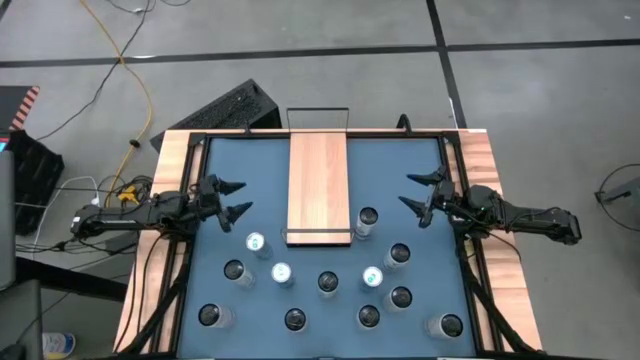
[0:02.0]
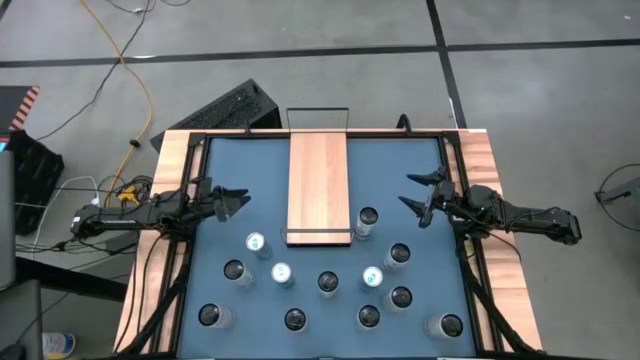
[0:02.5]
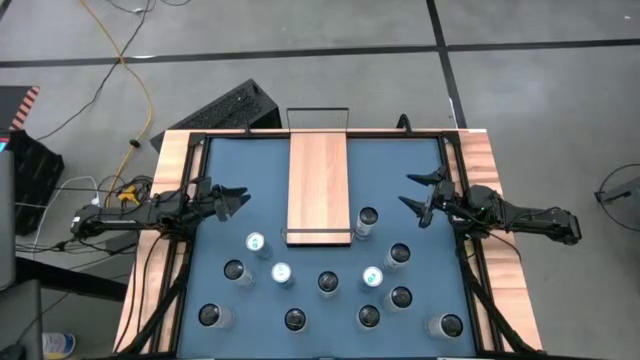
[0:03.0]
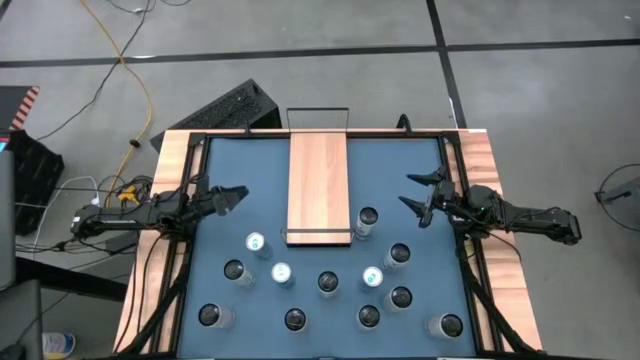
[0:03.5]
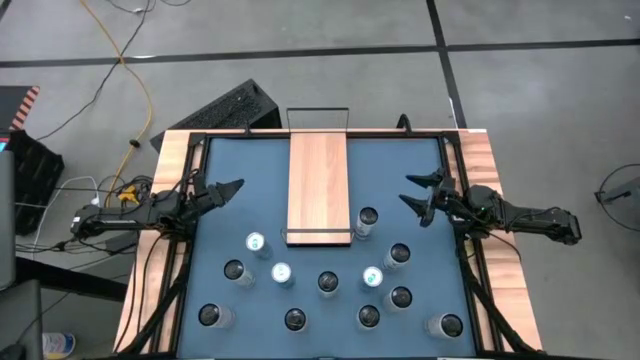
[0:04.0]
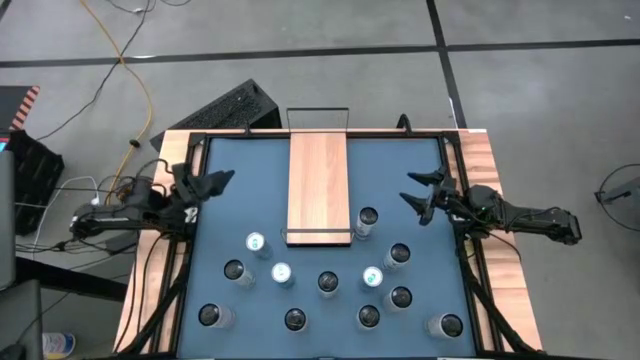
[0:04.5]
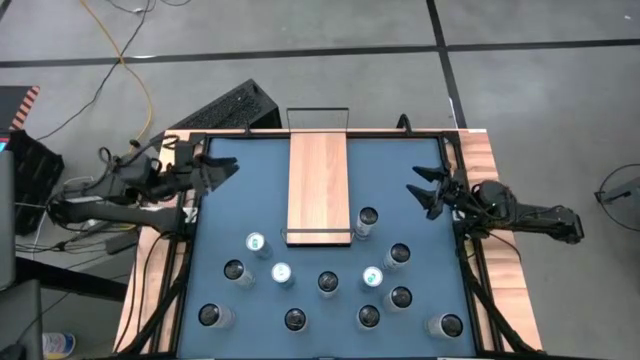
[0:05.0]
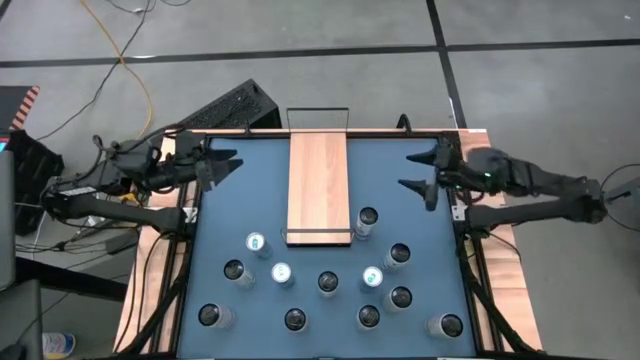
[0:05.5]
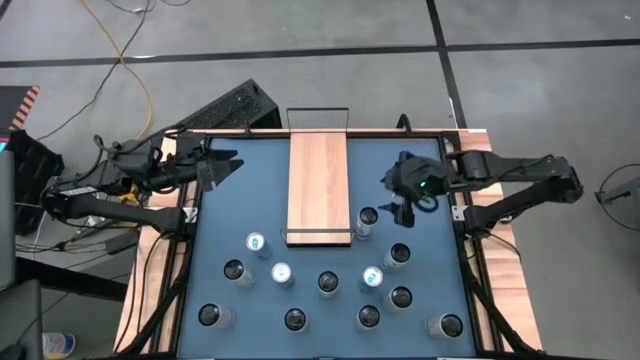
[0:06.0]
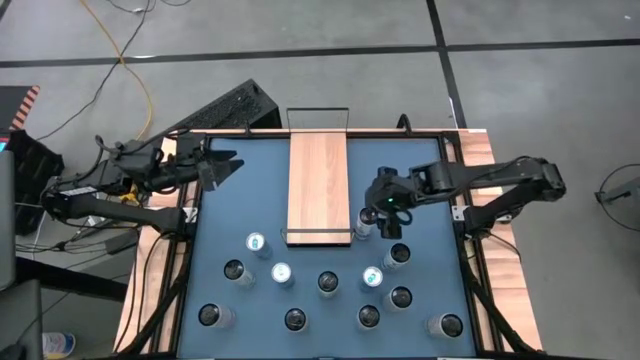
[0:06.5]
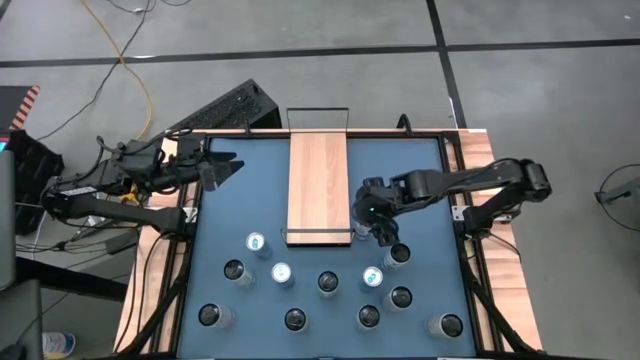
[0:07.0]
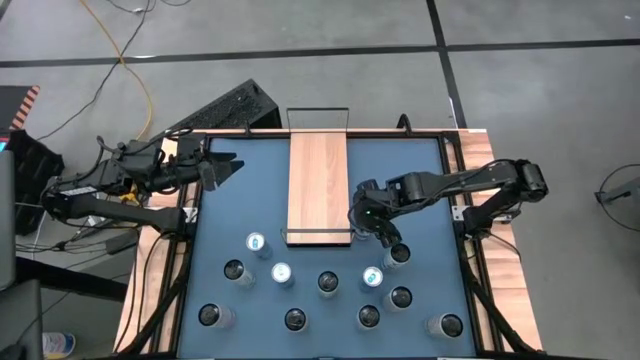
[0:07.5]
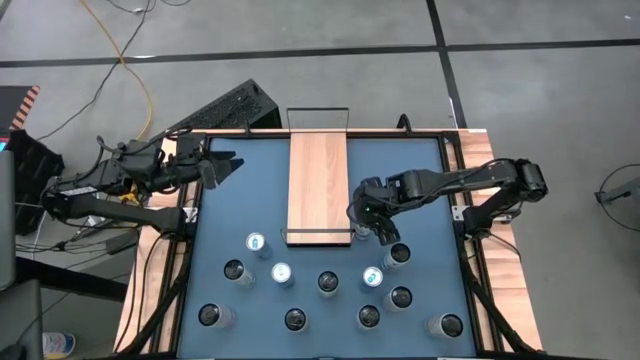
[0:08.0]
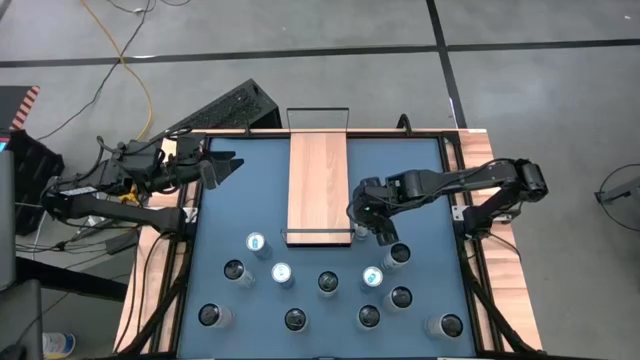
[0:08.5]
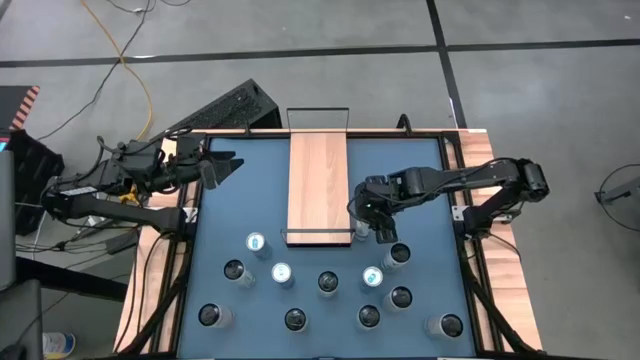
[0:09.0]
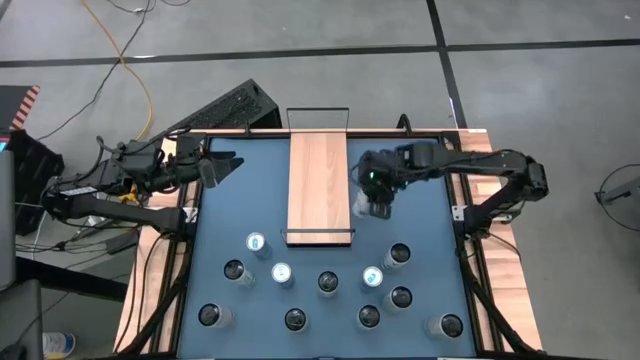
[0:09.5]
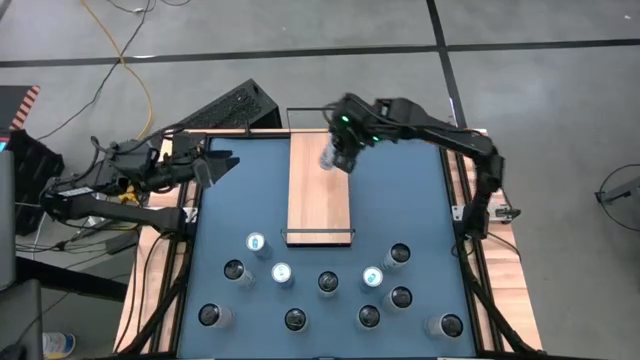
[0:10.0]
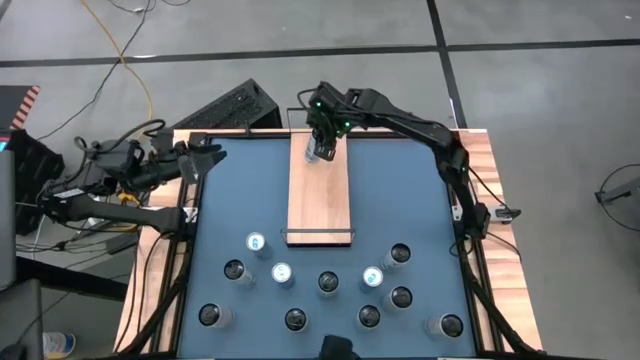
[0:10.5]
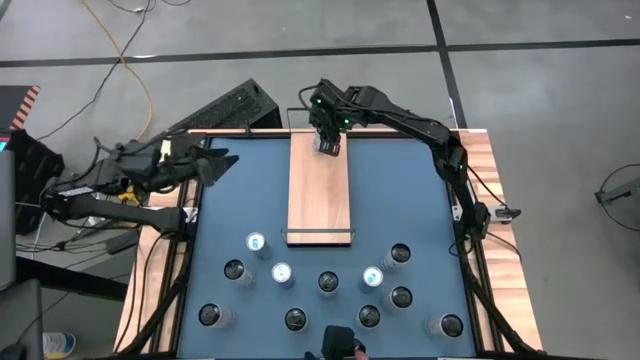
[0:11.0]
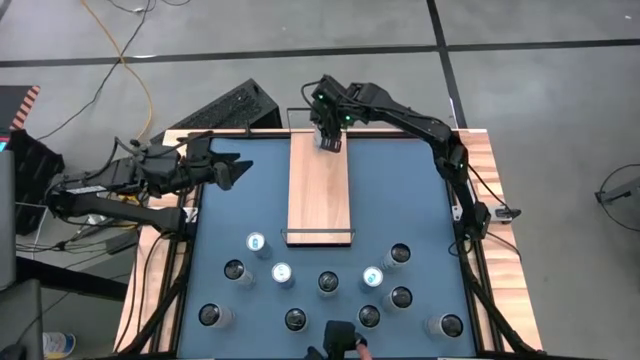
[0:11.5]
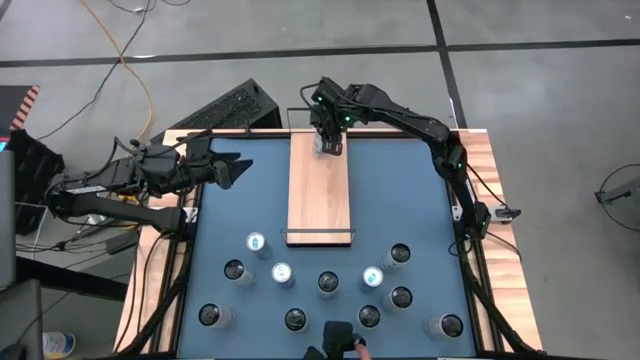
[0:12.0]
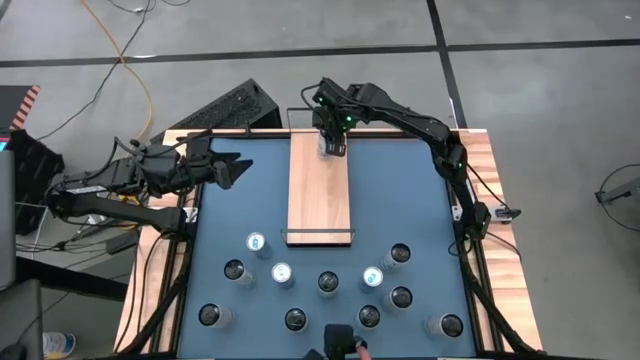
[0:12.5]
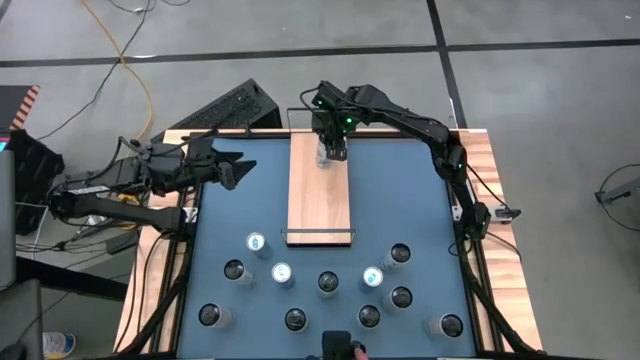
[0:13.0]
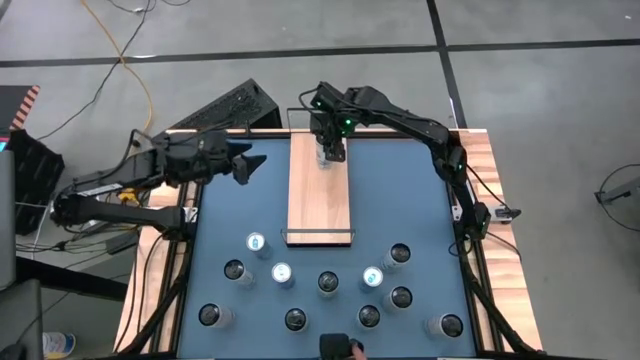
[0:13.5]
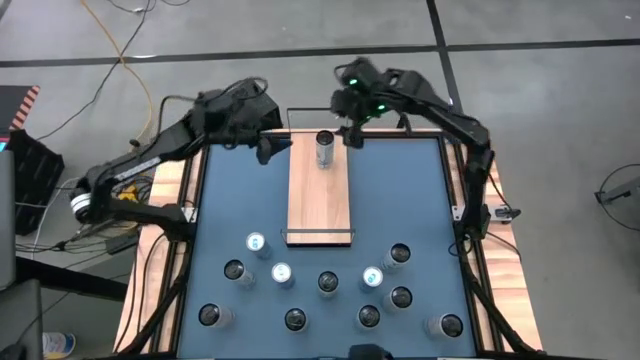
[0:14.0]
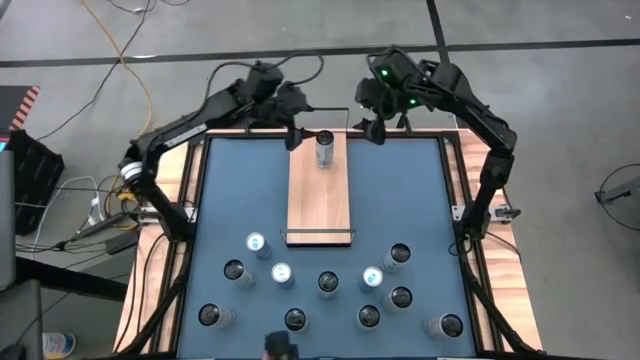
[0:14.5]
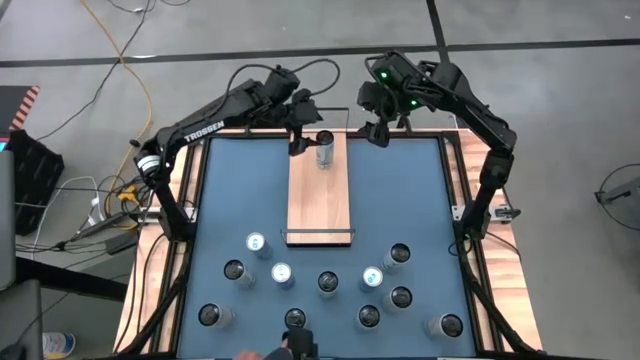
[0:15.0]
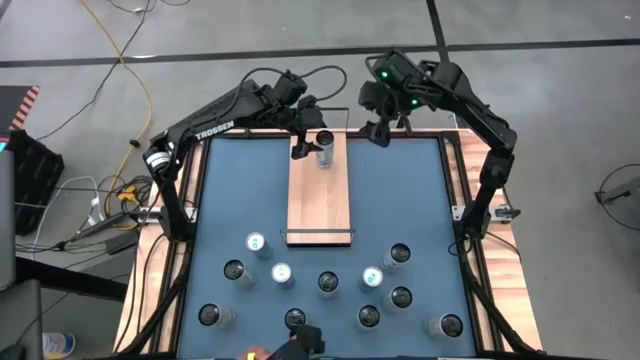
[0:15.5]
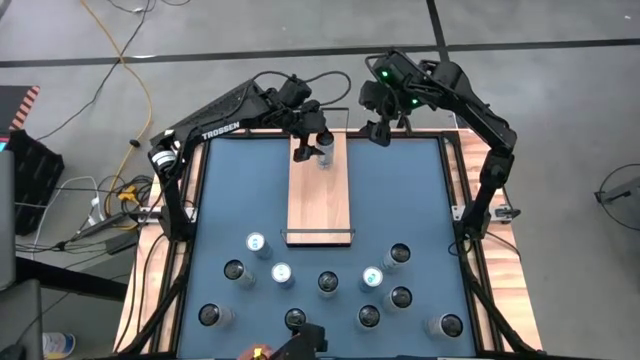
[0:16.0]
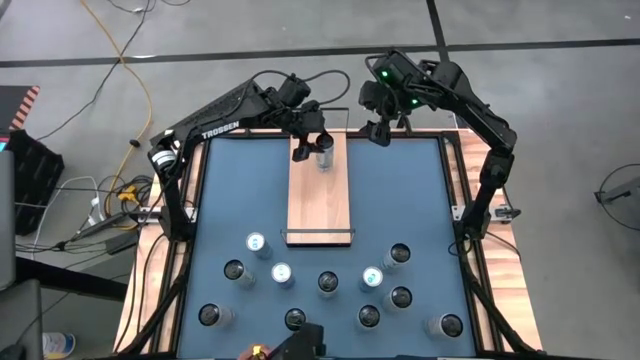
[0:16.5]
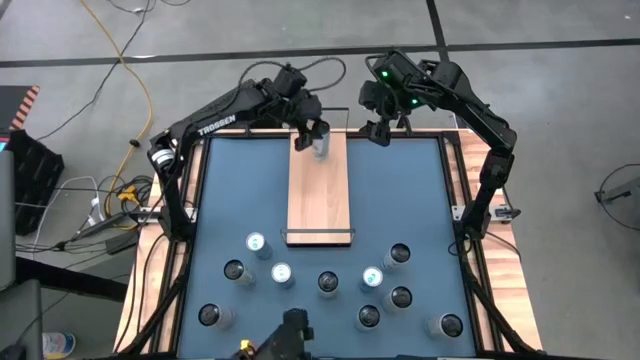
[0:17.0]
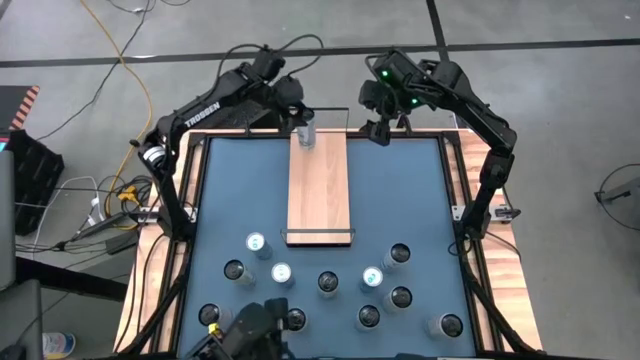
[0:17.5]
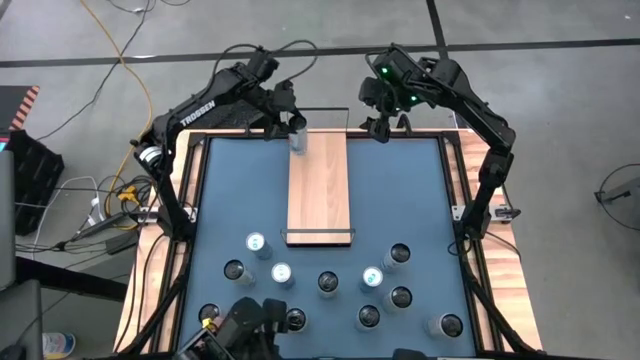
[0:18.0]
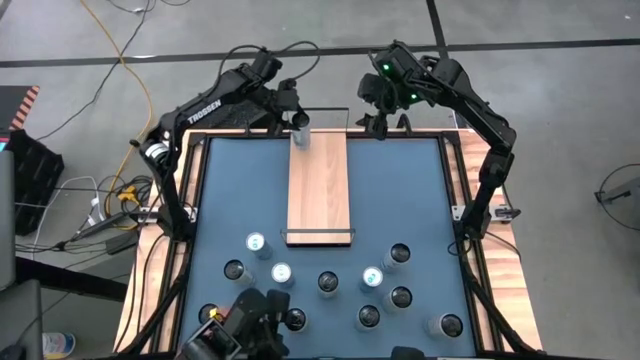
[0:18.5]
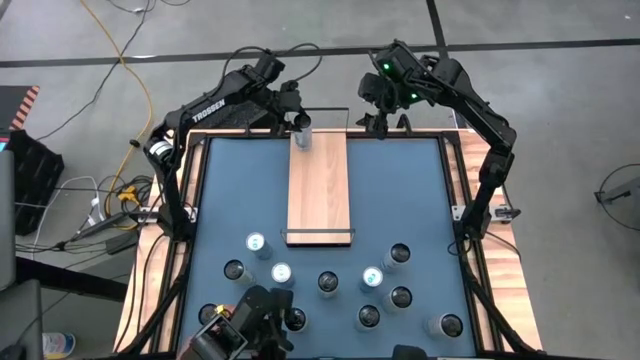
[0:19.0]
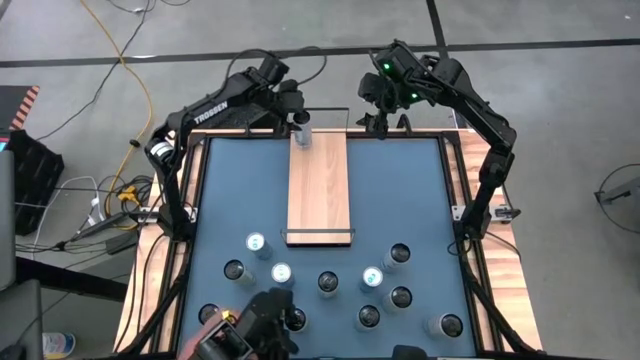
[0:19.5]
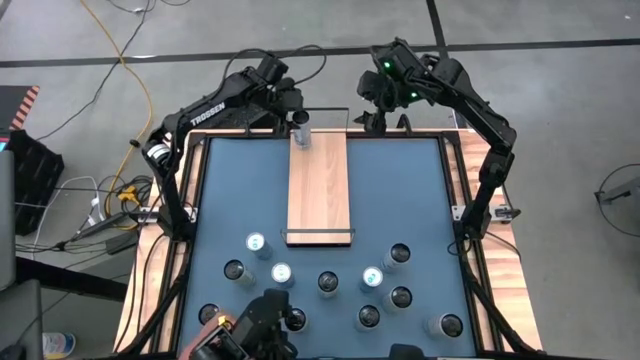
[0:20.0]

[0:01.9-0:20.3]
Task: Place canned beverage on shelf
Put the top white-blue soda can on the shelf

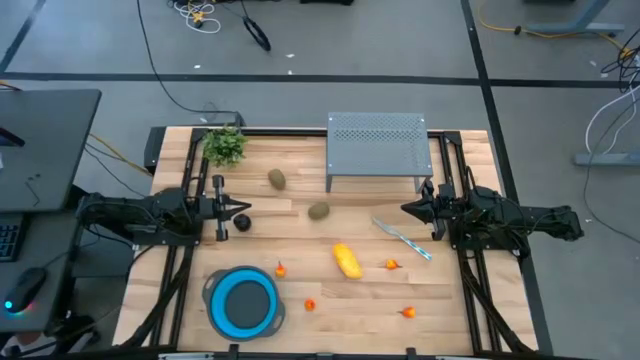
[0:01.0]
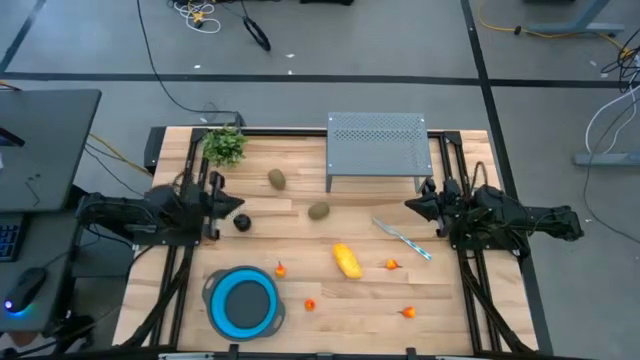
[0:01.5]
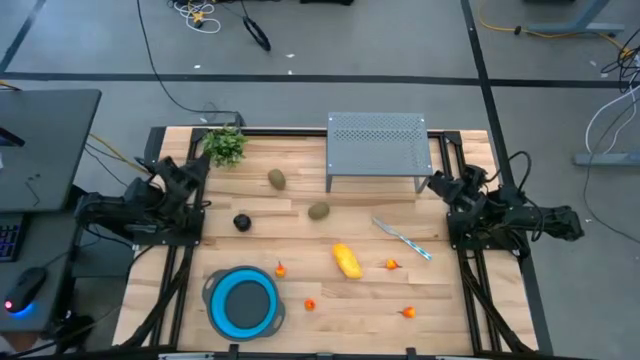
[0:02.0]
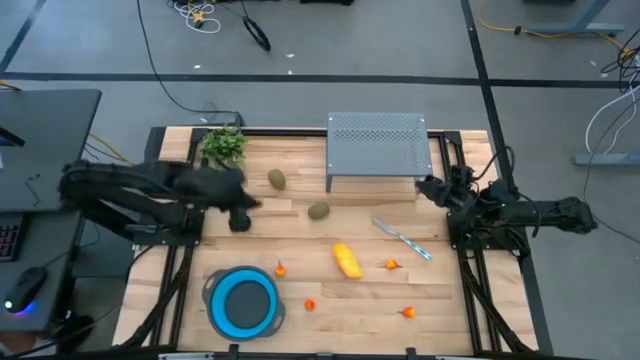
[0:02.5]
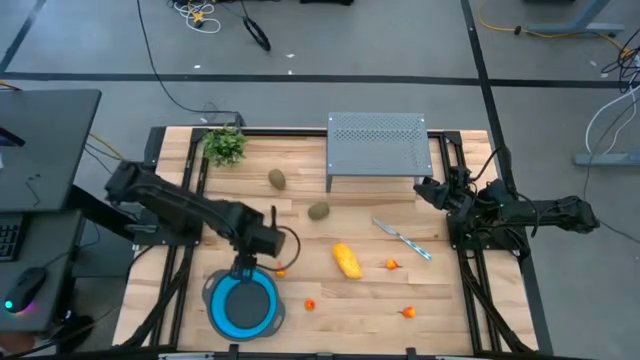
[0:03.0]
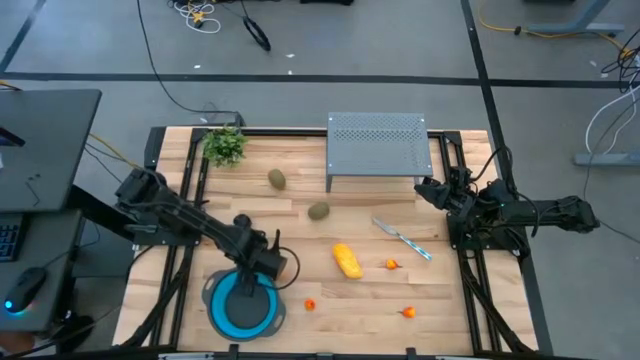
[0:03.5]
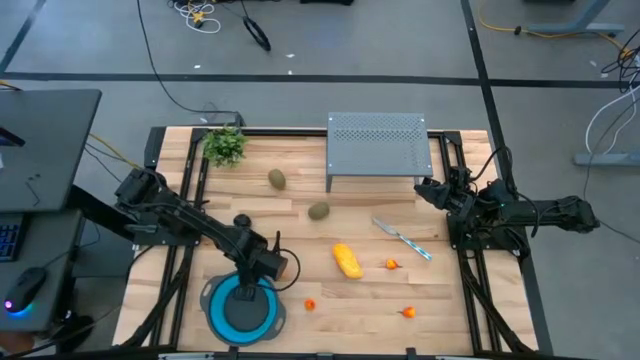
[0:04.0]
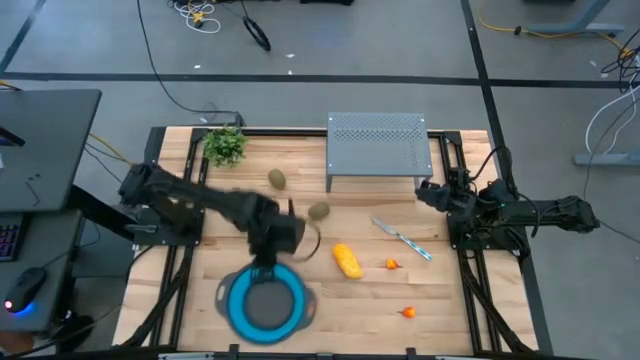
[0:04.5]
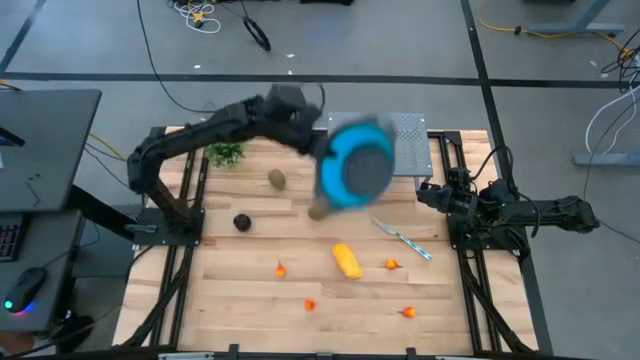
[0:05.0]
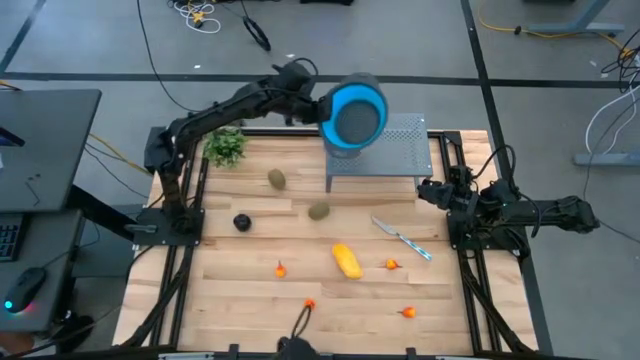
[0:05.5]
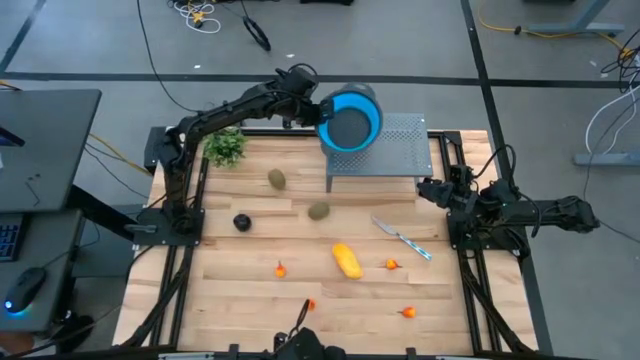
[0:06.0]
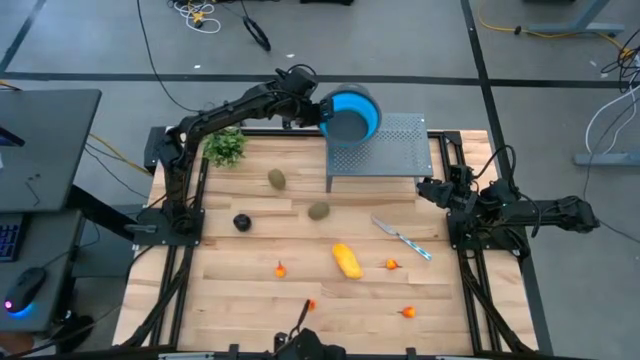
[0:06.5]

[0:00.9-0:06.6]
Task: Pick & Place Fruit
Put the strainer bowl on the shelf
